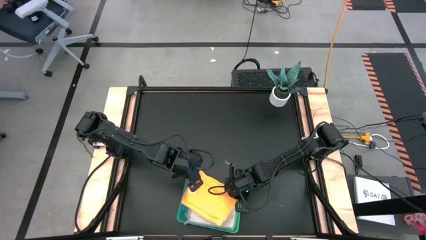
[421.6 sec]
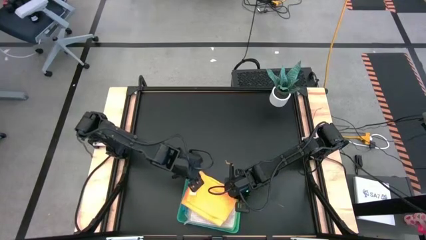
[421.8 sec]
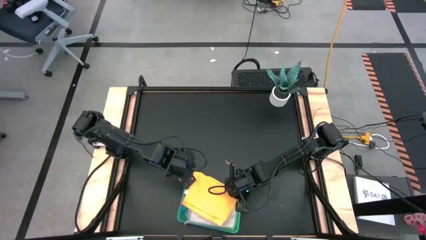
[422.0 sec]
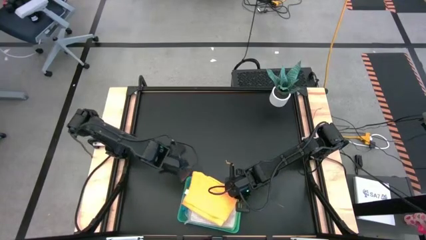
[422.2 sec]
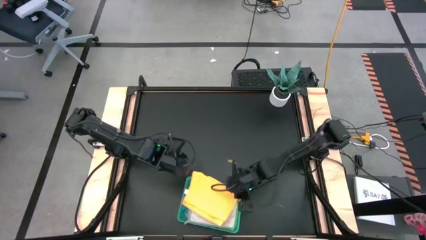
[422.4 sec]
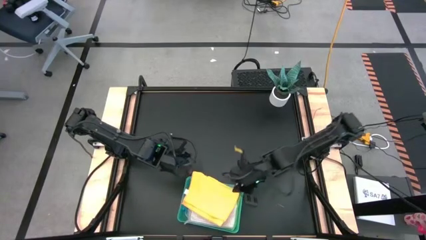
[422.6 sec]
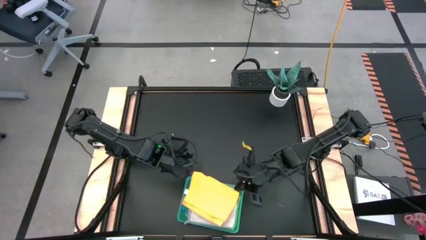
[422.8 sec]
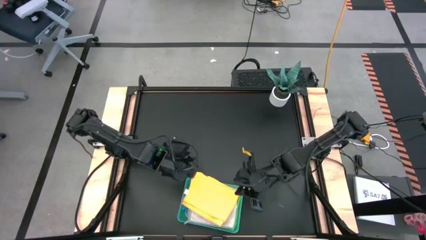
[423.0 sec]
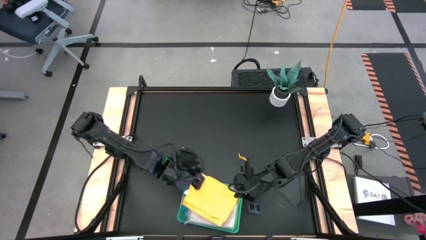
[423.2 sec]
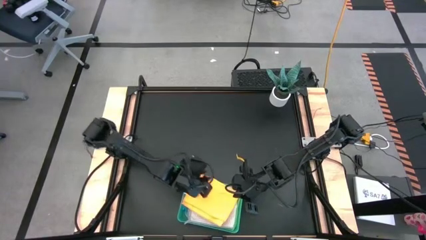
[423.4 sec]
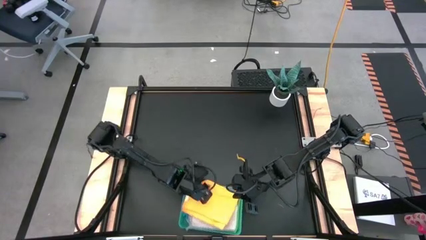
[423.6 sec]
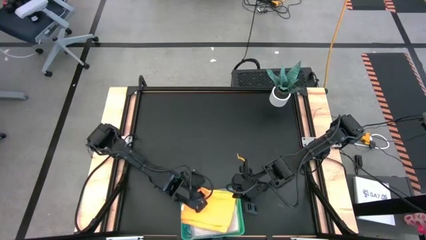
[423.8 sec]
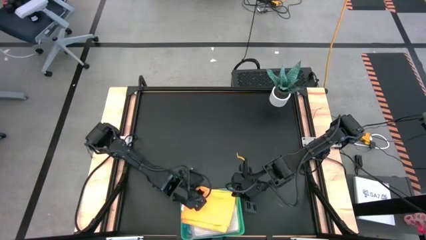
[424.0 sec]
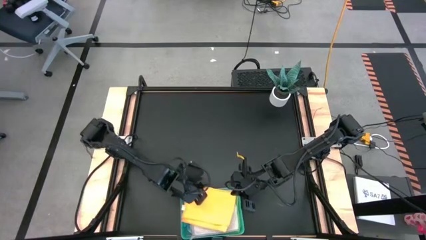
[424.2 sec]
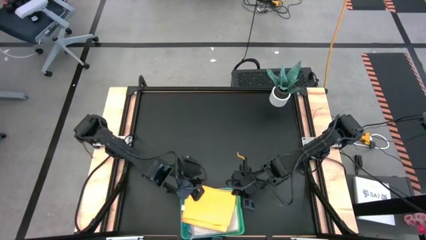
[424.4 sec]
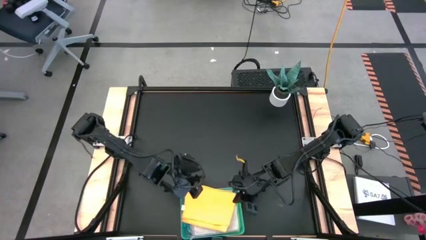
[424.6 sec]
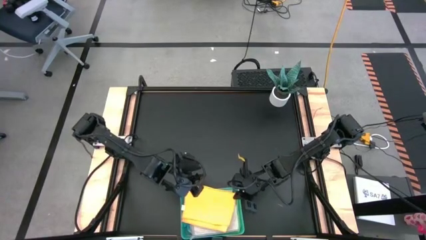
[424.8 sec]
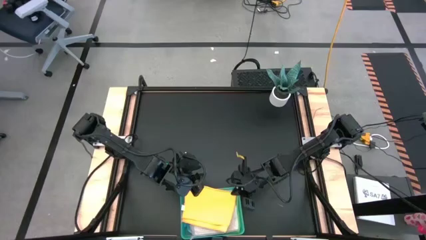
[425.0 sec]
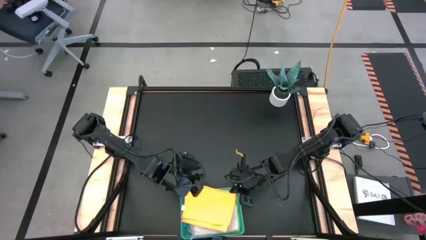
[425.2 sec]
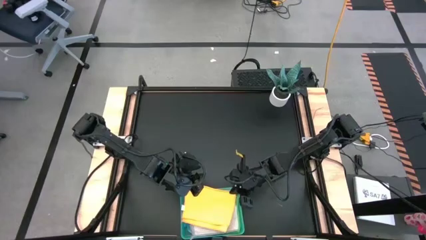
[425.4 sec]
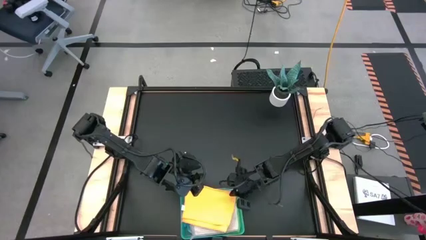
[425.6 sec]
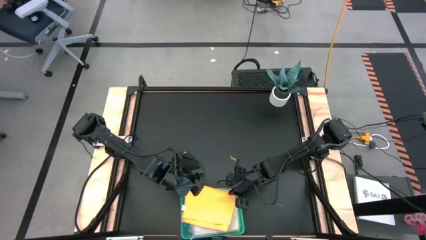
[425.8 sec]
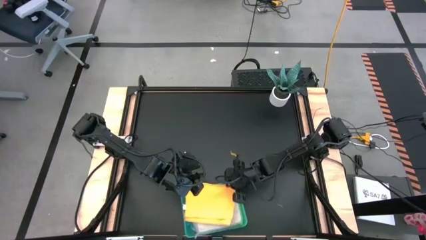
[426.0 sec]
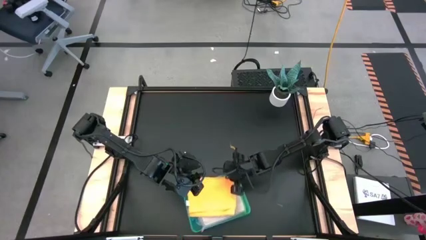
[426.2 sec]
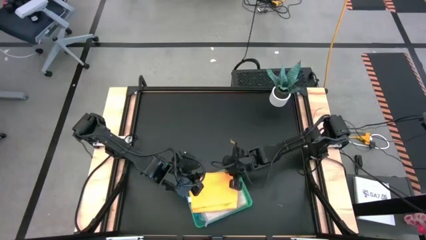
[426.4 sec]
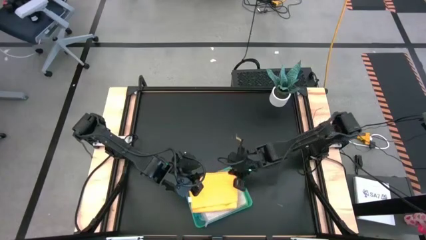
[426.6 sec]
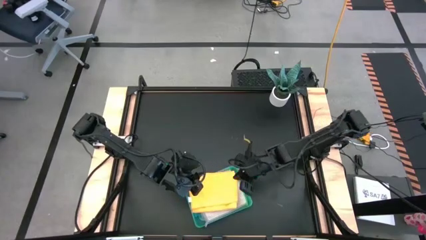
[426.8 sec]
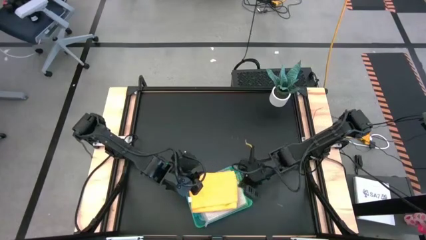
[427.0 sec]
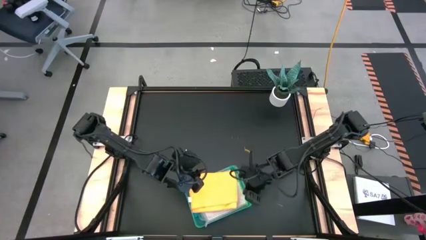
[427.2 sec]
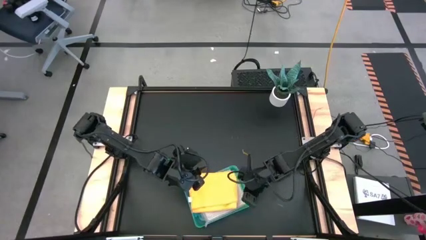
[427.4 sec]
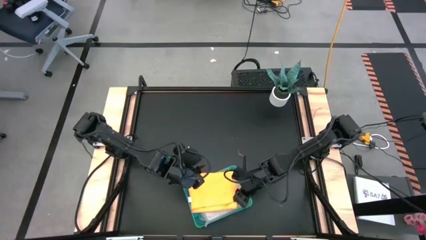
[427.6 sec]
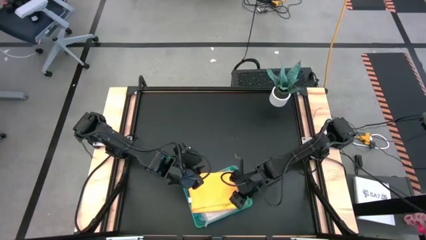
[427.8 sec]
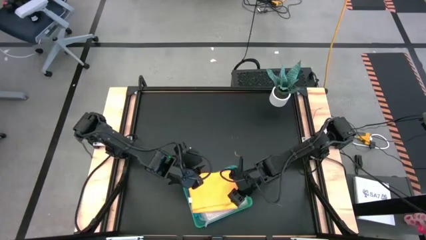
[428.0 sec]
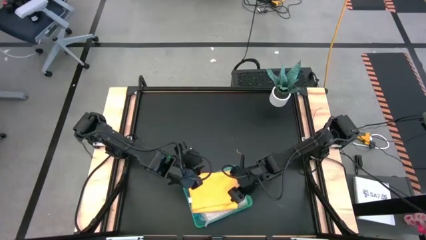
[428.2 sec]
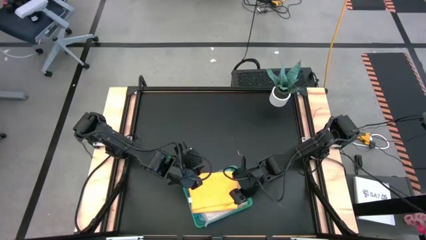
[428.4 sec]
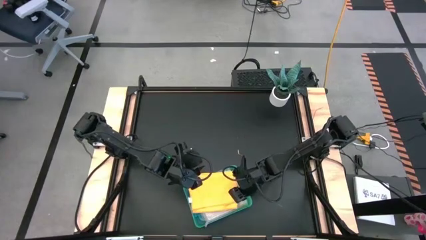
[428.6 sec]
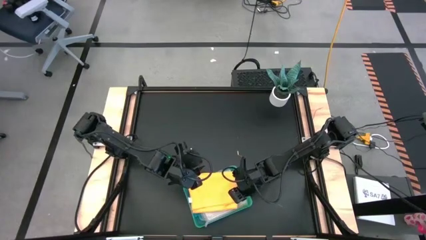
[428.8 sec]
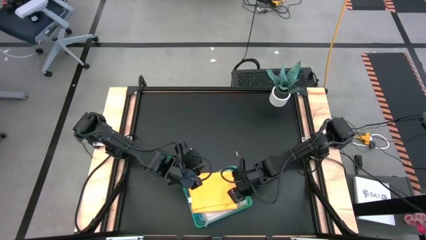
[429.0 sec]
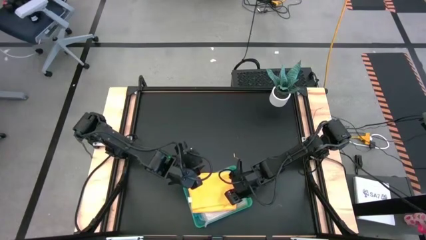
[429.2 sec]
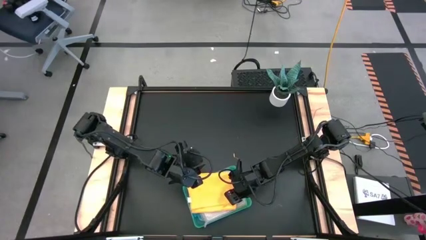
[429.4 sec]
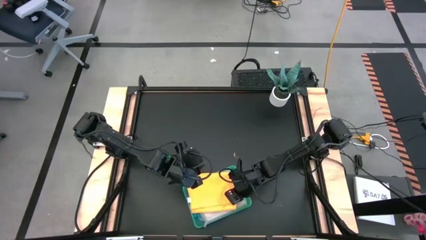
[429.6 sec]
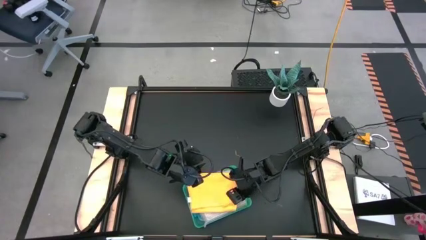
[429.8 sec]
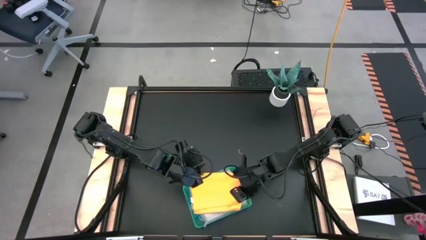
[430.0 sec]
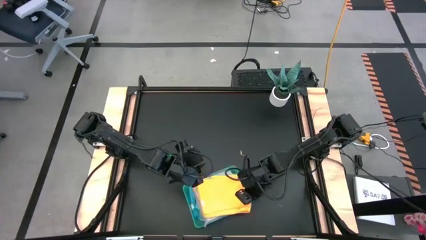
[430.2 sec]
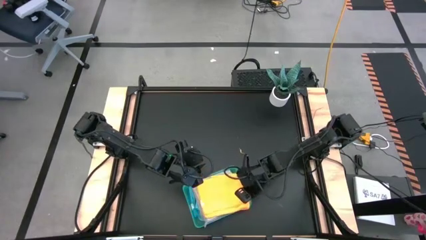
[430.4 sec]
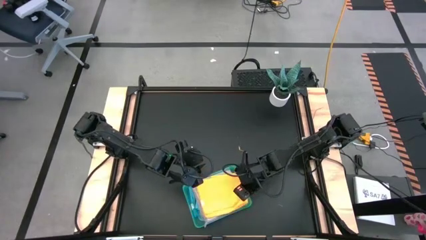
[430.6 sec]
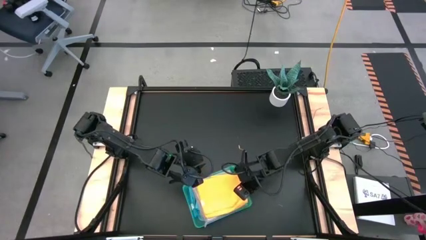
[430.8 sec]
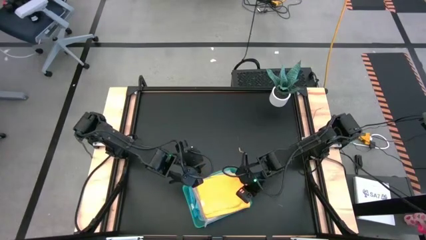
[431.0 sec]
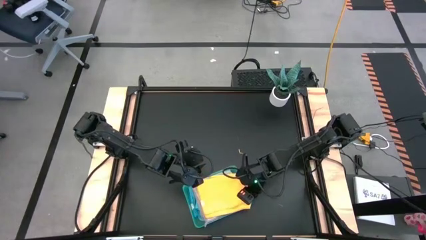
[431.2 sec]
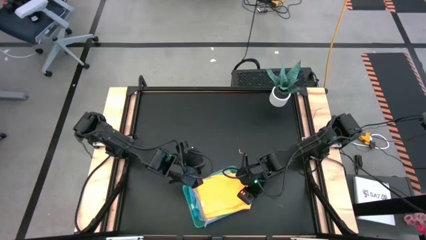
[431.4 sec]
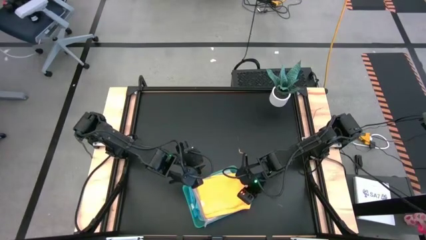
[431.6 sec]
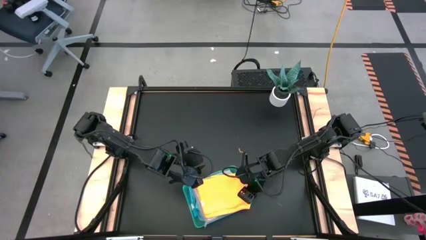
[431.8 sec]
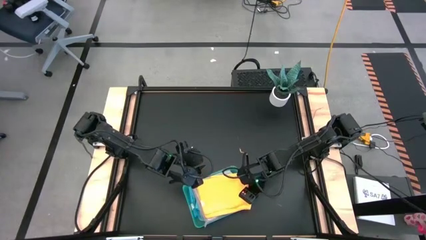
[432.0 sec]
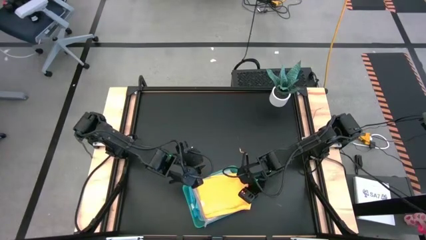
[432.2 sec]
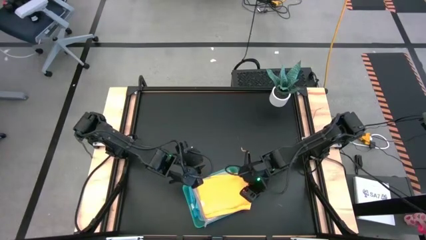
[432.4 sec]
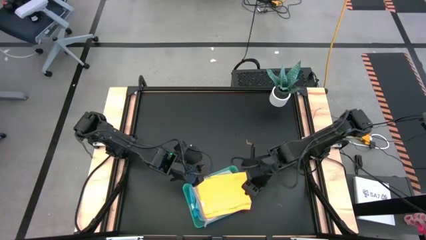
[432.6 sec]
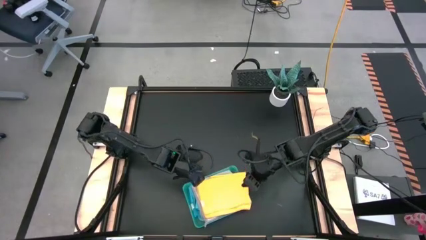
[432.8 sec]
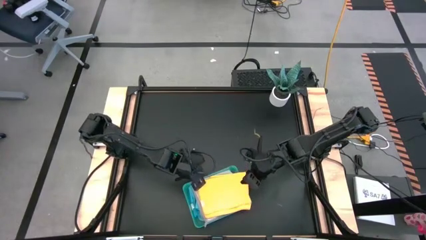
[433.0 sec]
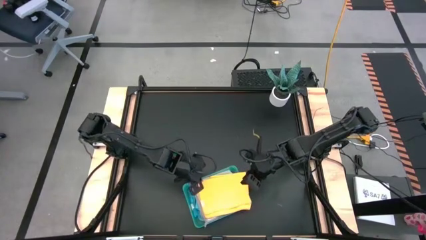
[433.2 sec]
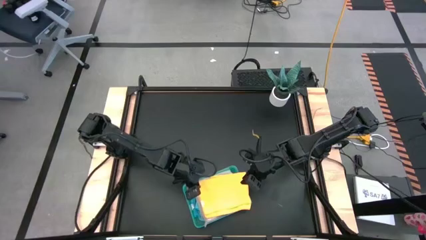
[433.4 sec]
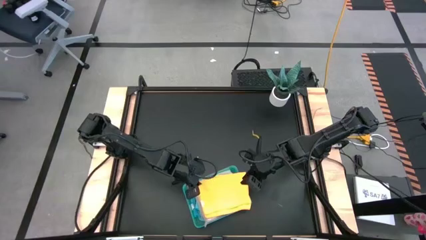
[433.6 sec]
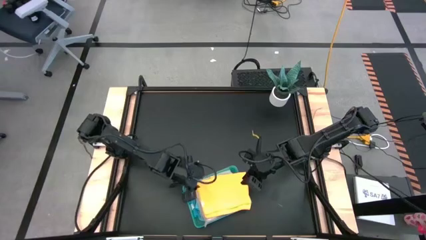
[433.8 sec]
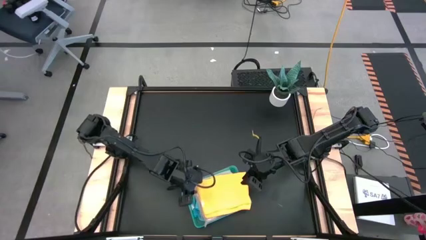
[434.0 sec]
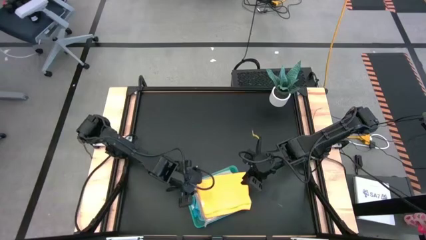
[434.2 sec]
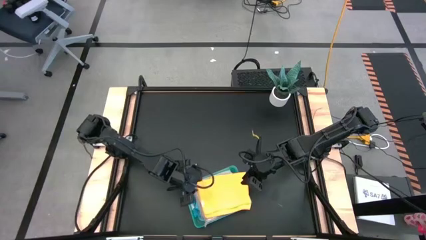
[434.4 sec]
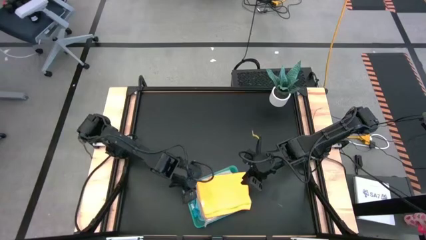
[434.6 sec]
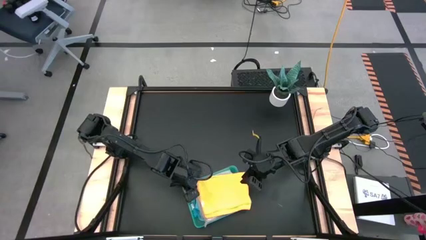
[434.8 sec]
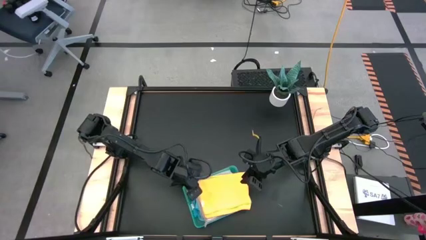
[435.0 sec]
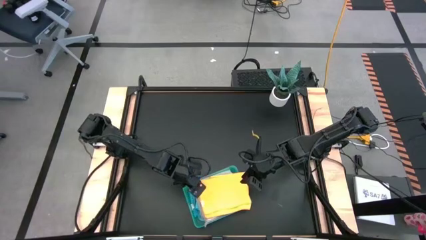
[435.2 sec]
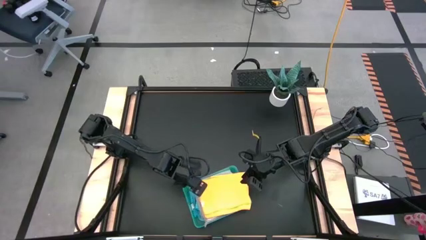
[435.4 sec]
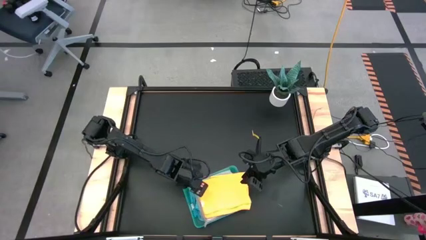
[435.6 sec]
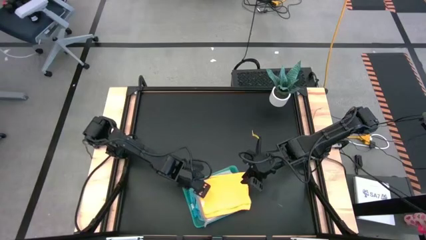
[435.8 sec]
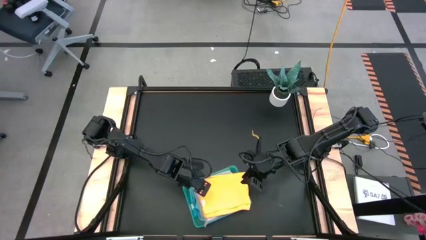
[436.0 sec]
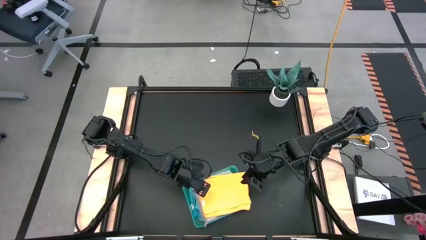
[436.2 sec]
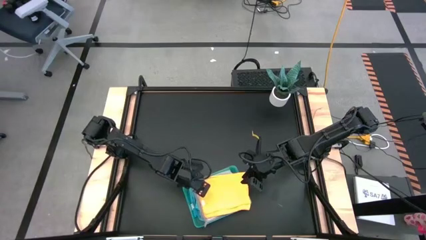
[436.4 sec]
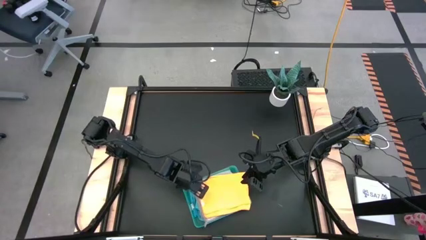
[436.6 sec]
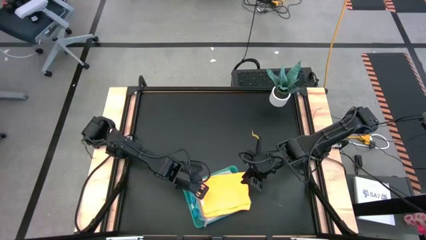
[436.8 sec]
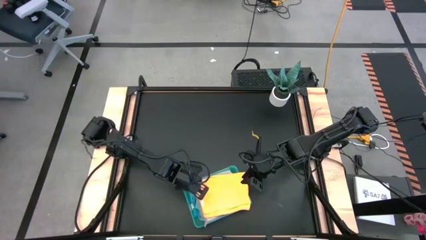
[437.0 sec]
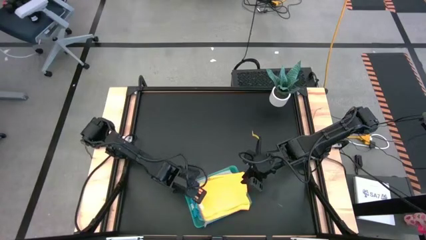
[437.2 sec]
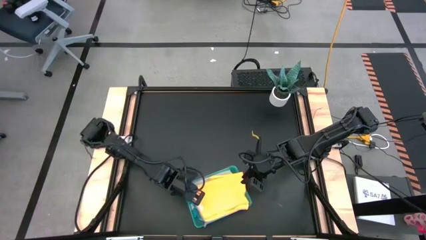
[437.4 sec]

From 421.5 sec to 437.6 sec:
Task: Fold microfiber towels
Put the folded orange microfiber cloth into the green transparent bin
